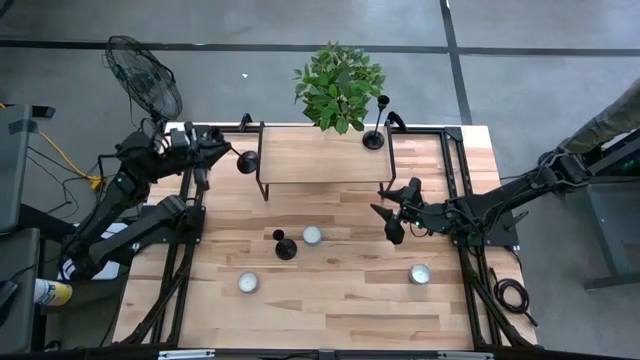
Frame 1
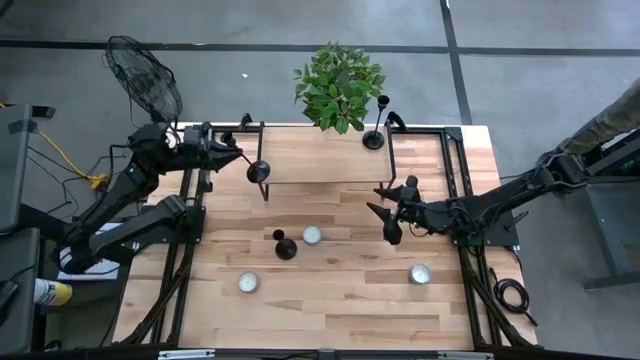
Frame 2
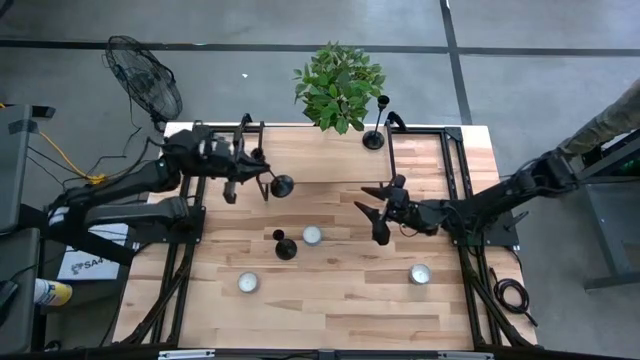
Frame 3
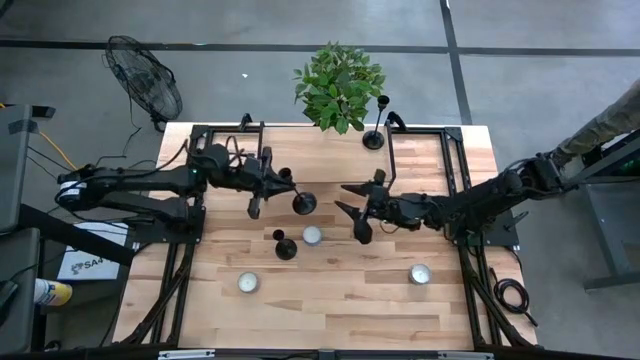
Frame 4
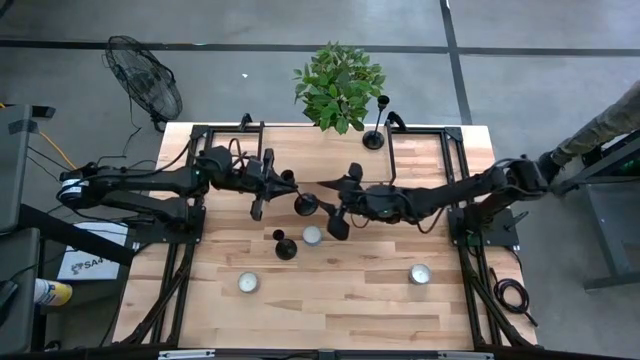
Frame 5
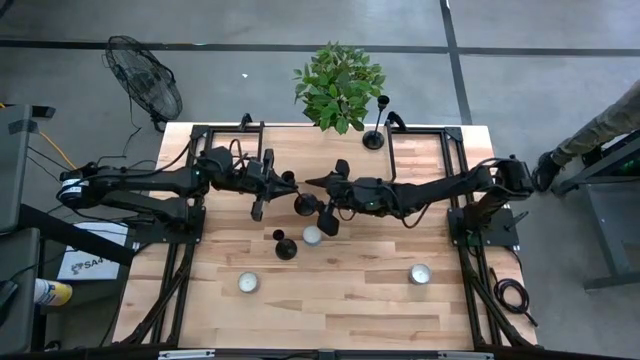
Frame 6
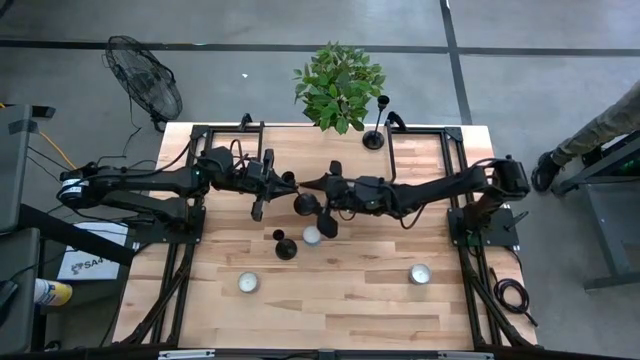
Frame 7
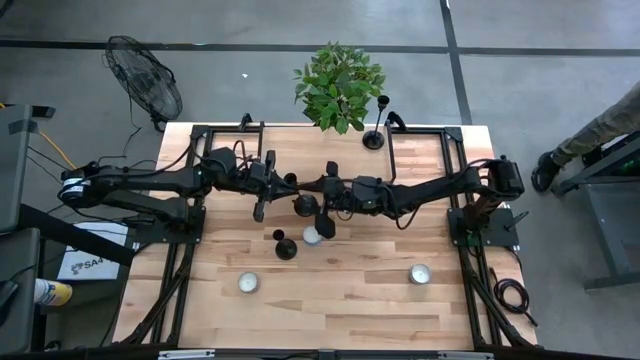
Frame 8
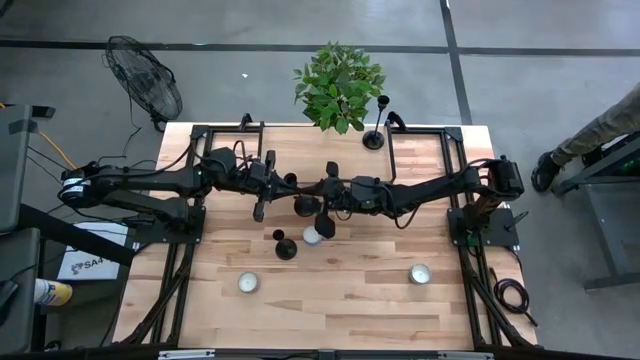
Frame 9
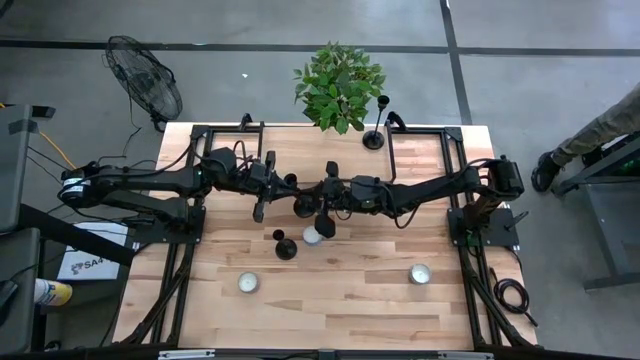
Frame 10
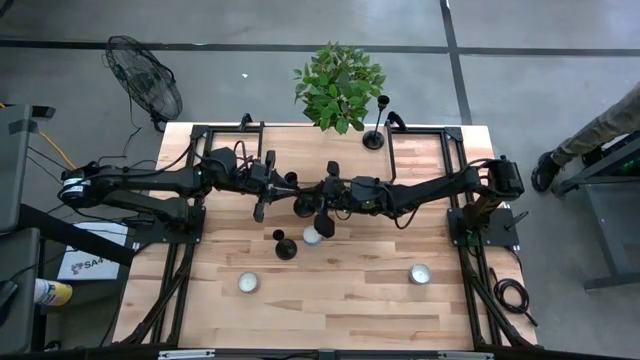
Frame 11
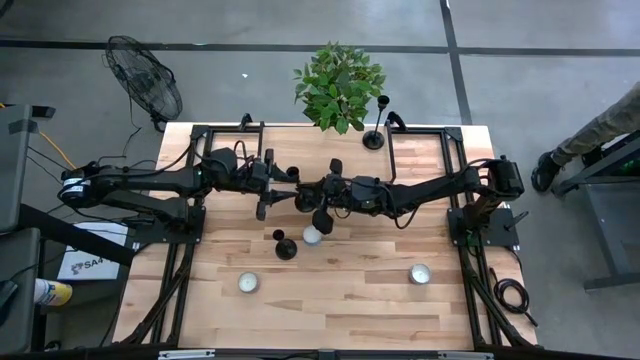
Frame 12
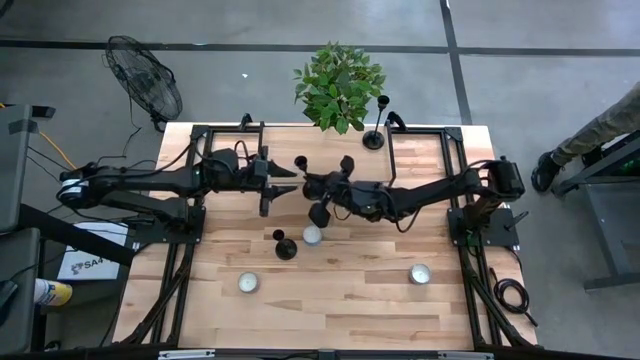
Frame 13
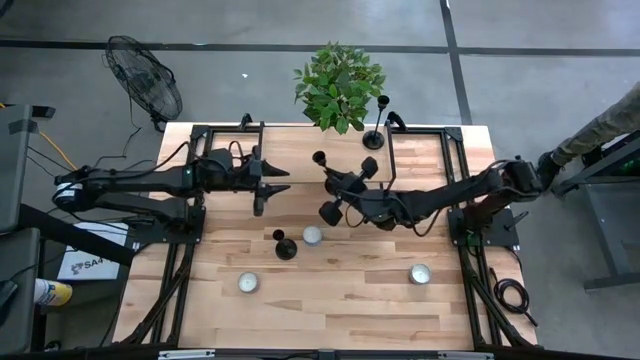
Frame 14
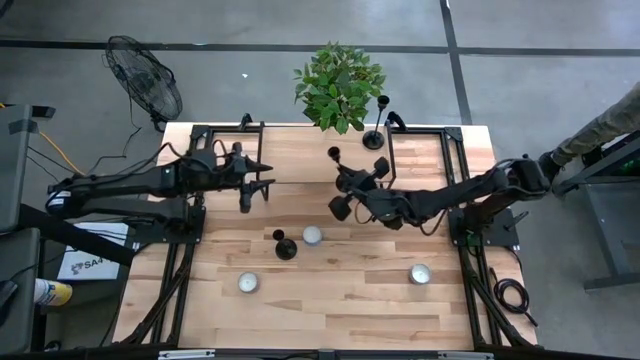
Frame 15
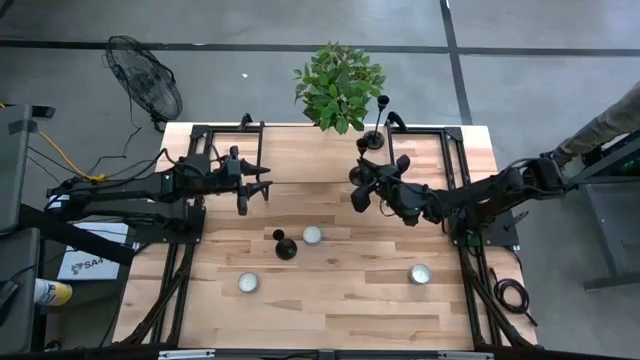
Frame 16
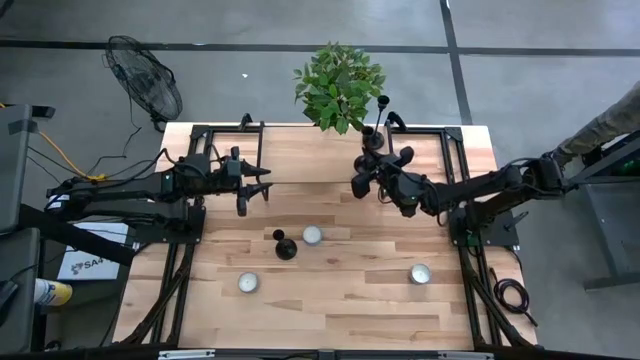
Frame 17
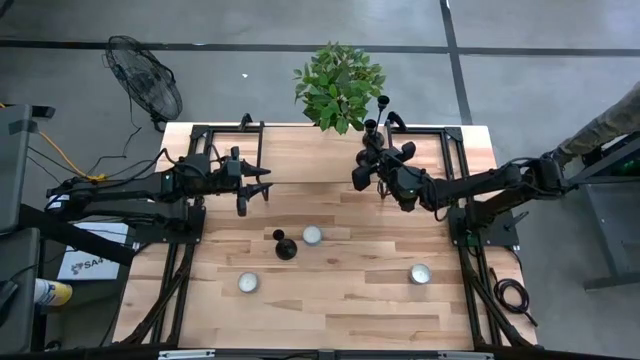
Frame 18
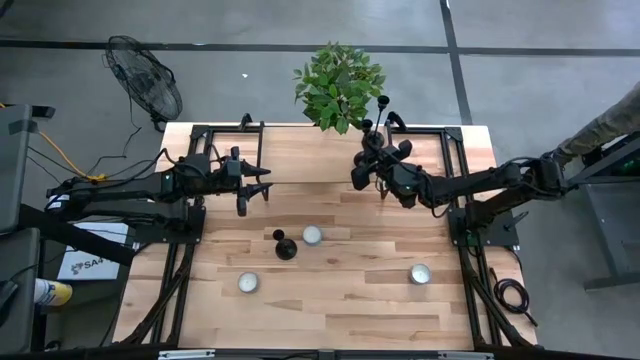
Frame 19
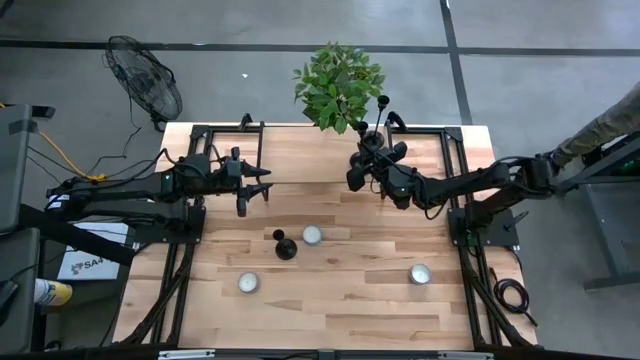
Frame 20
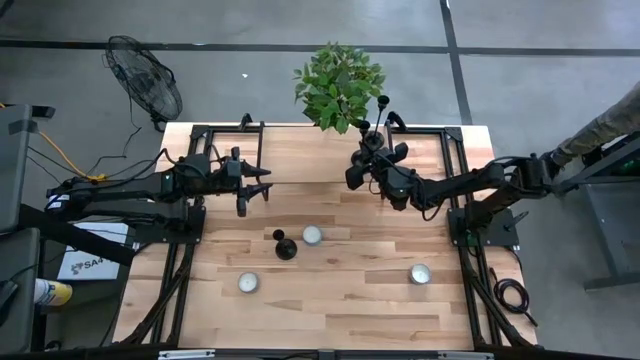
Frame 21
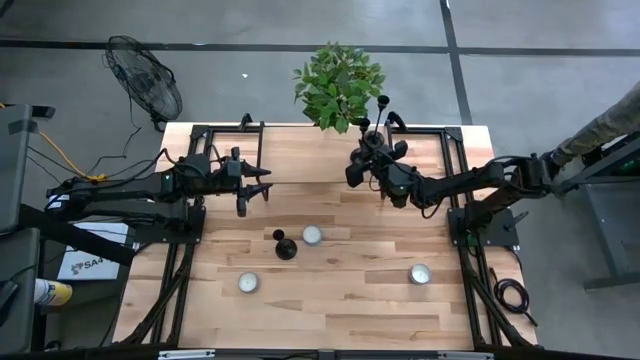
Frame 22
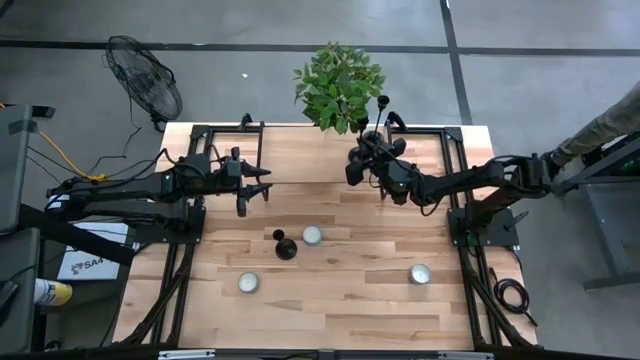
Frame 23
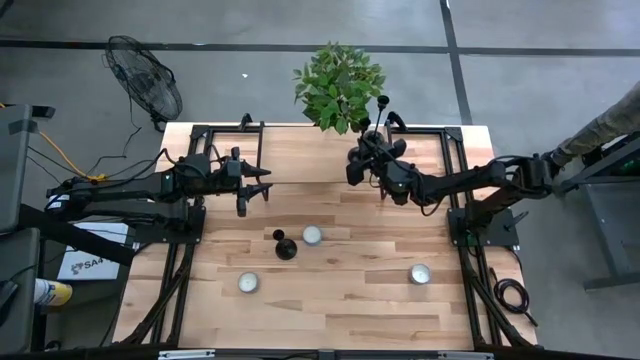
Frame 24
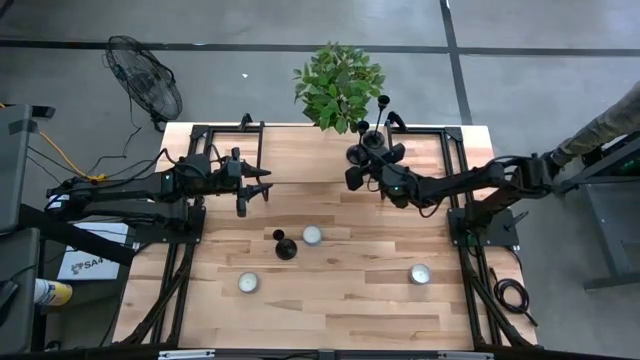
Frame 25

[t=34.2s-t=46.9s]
Task: Pick & Place candle stick holders
Put the left black candle holder on the shelf

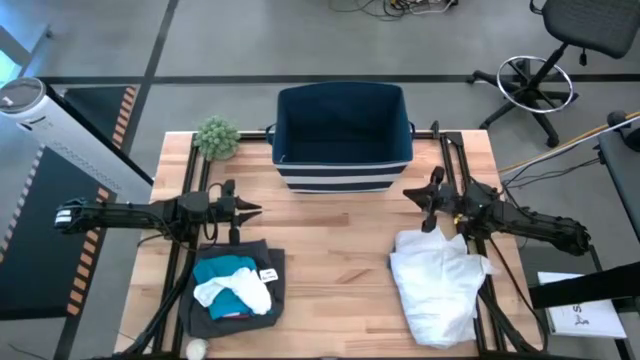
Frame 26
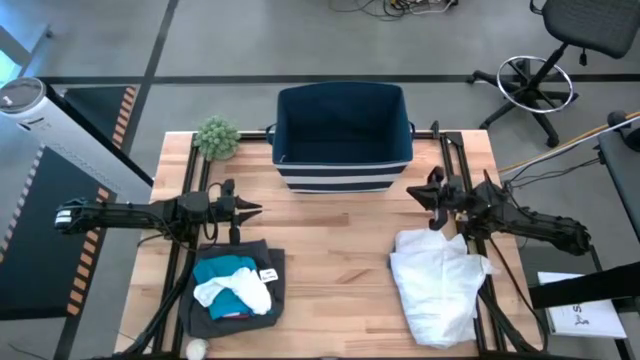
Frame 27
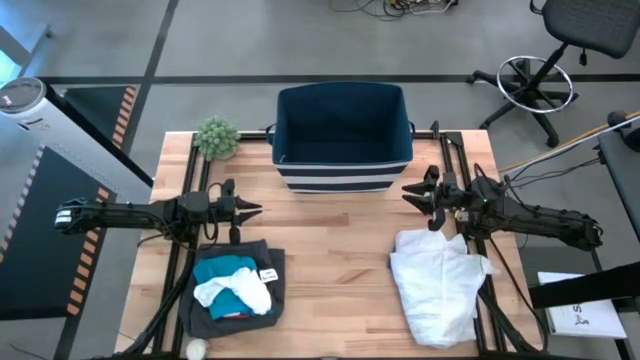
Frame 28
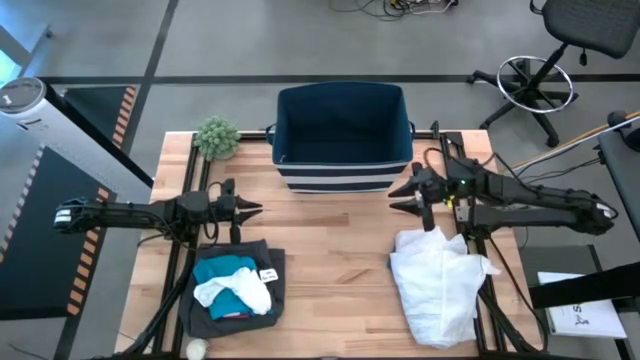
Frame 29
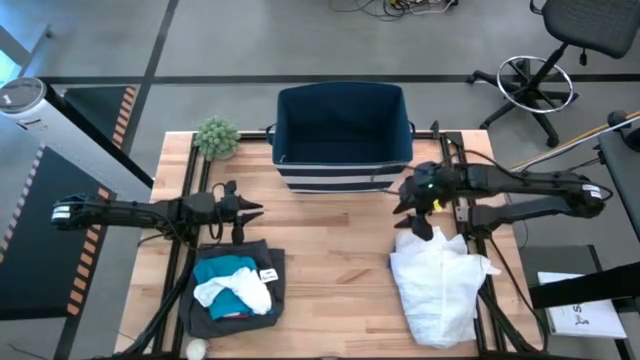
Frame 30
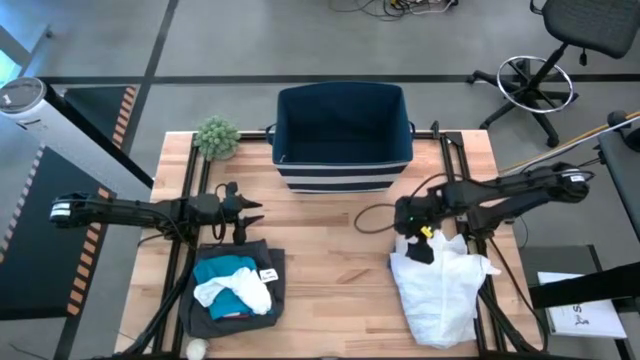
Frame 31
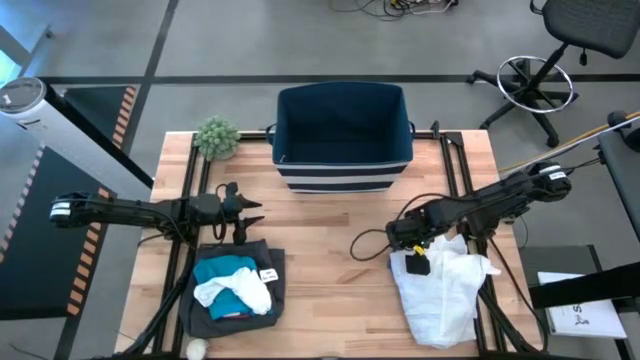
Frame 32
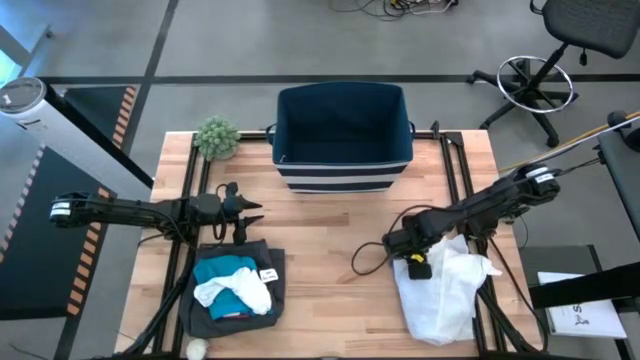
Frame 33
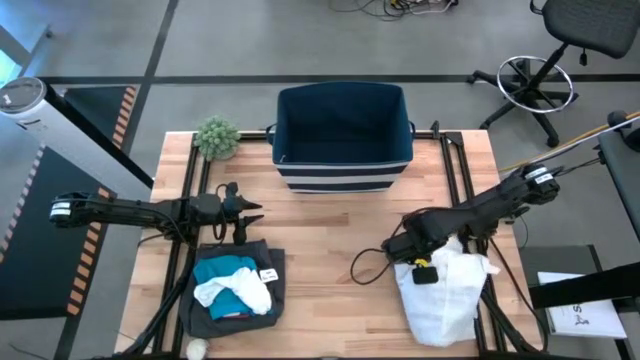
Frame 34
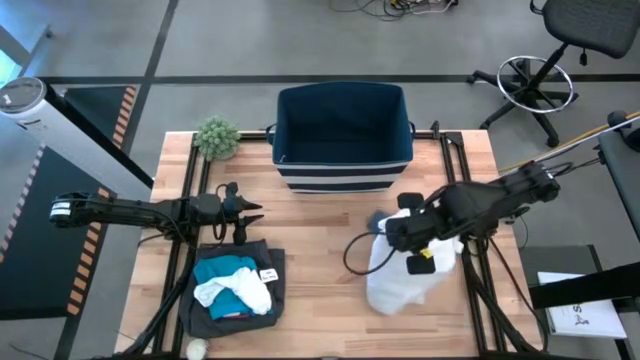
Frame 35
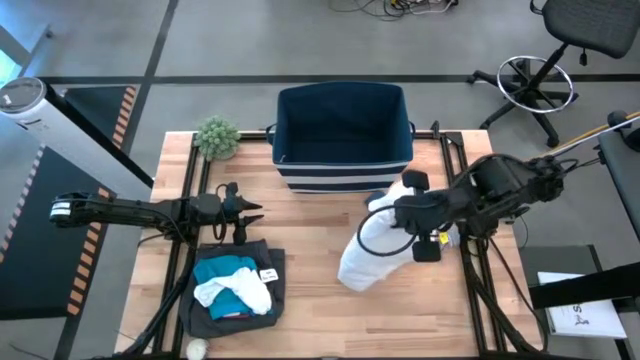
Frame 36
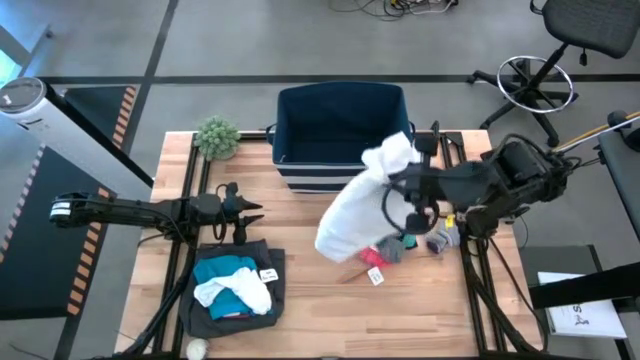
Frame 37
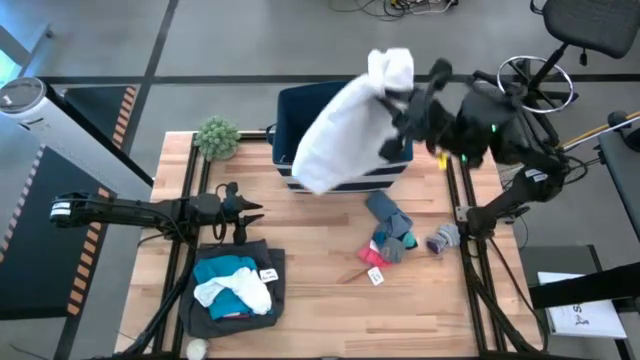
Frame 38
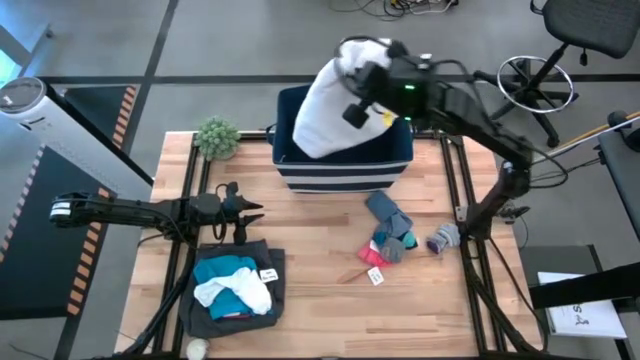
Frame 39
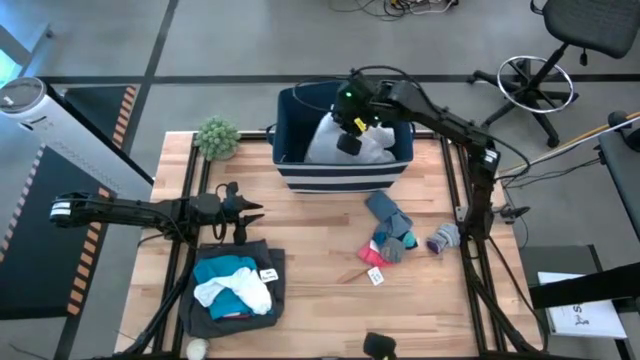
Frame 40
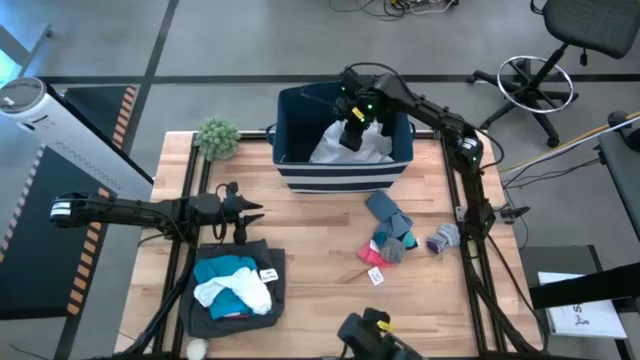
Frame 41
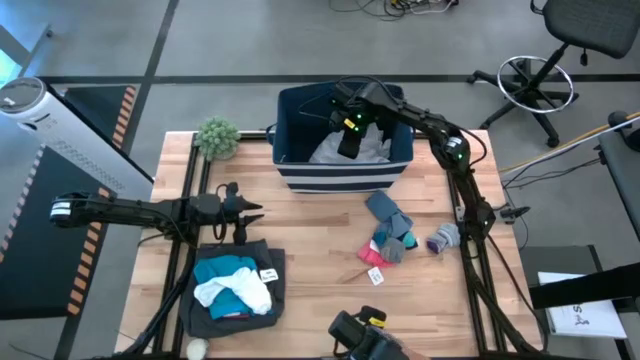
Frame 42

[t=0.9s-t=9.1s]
Task: Sort clothes
Put the white polo shirt into the laundry bin
